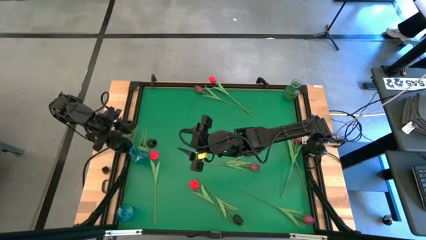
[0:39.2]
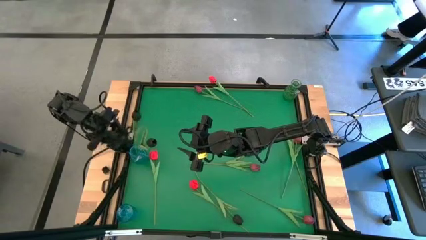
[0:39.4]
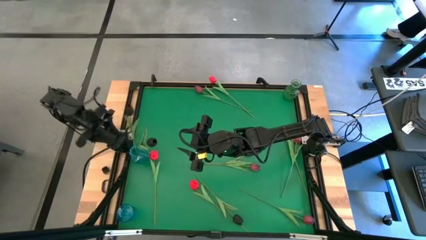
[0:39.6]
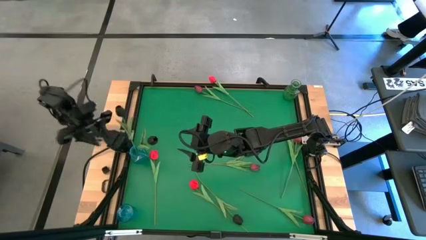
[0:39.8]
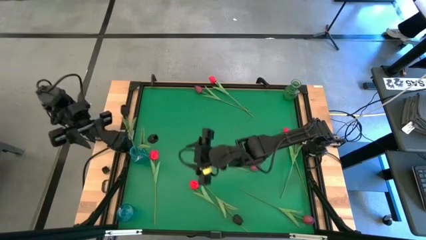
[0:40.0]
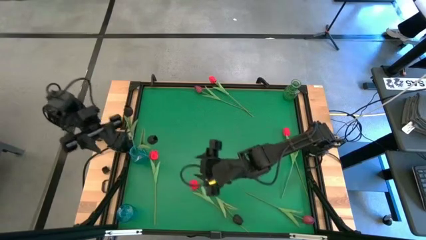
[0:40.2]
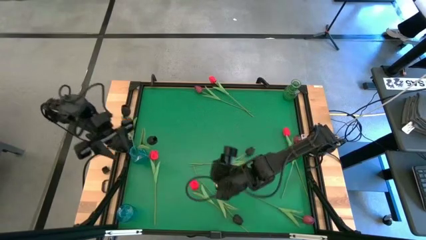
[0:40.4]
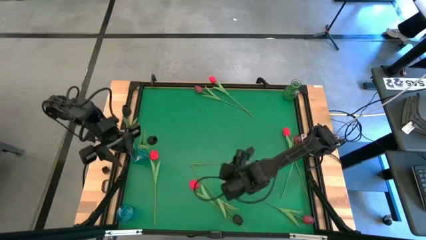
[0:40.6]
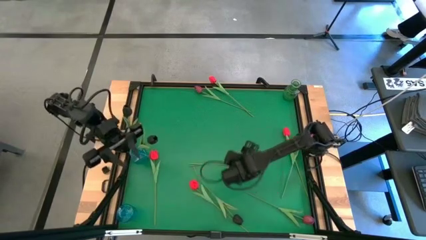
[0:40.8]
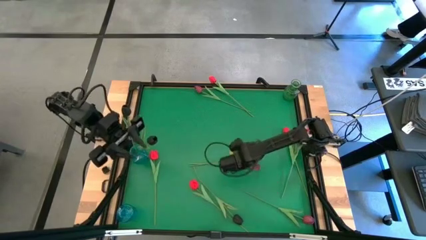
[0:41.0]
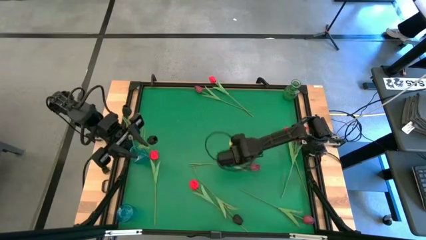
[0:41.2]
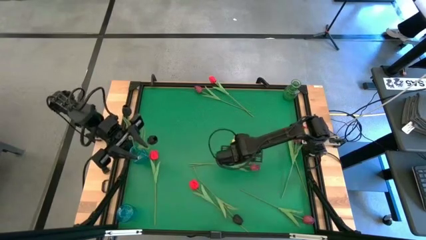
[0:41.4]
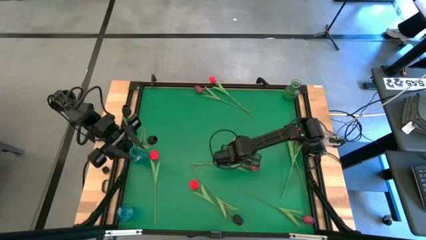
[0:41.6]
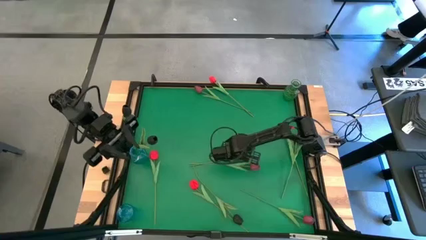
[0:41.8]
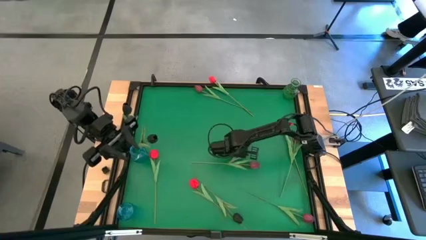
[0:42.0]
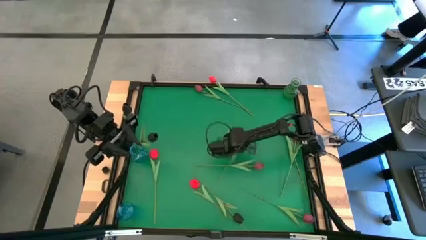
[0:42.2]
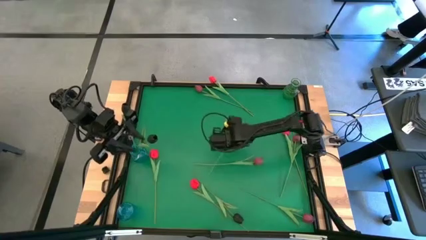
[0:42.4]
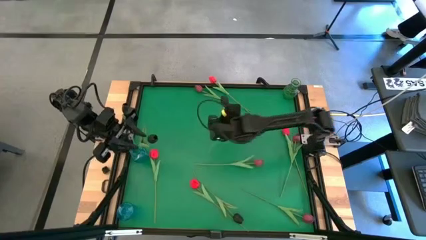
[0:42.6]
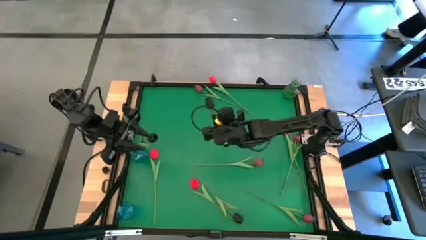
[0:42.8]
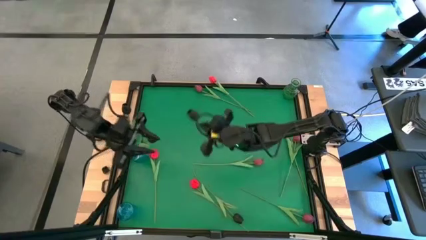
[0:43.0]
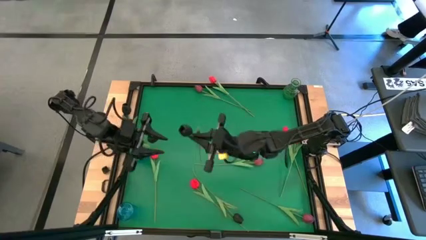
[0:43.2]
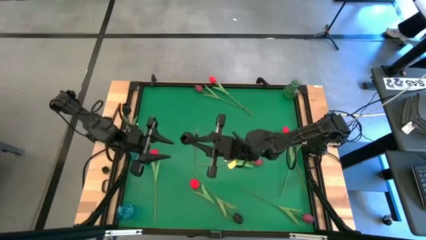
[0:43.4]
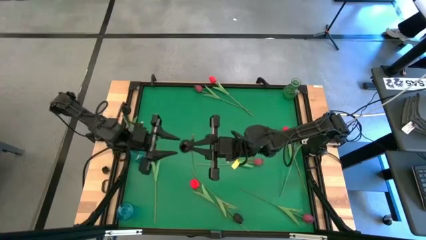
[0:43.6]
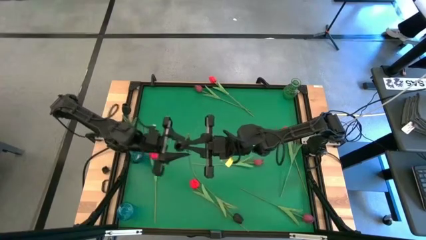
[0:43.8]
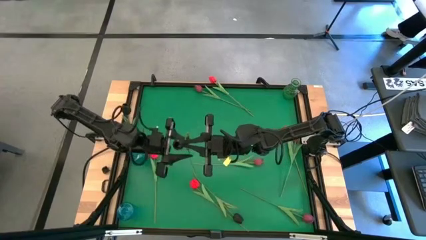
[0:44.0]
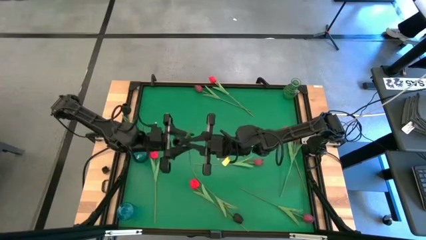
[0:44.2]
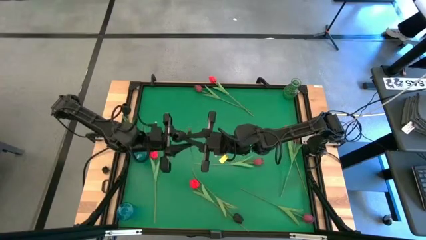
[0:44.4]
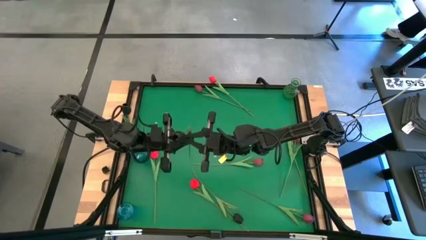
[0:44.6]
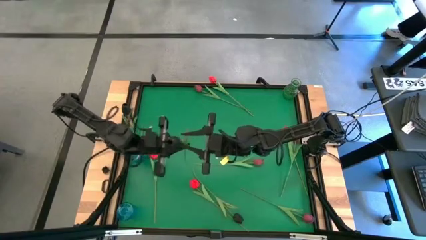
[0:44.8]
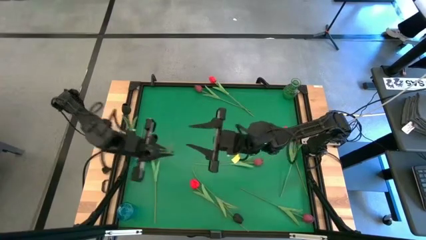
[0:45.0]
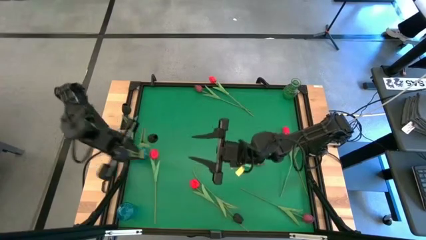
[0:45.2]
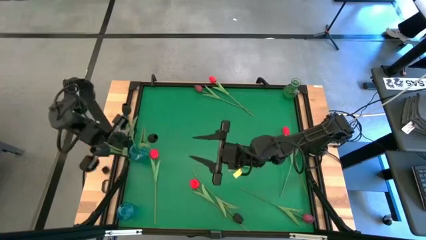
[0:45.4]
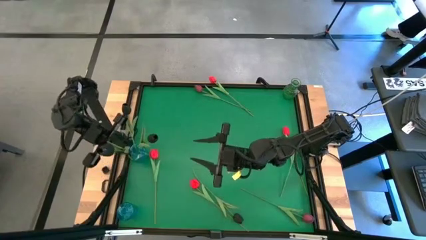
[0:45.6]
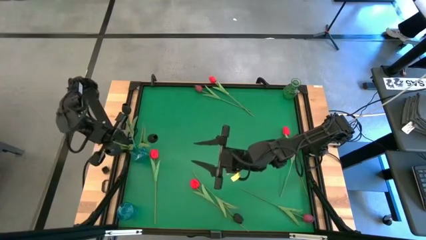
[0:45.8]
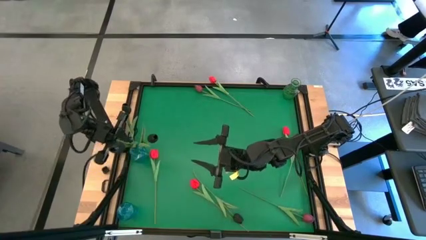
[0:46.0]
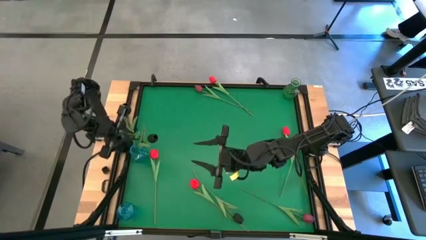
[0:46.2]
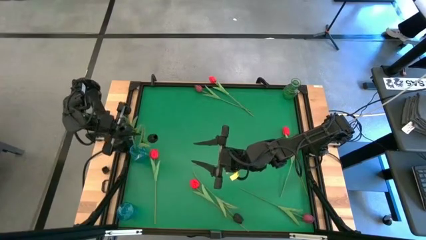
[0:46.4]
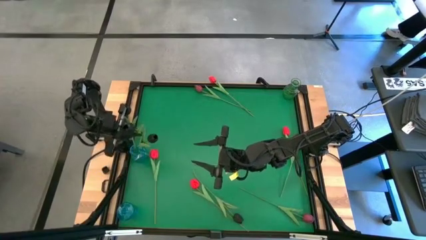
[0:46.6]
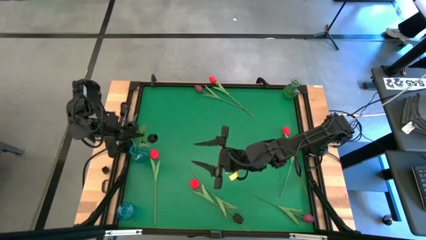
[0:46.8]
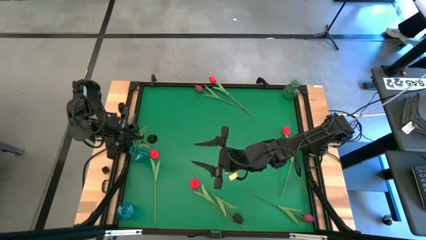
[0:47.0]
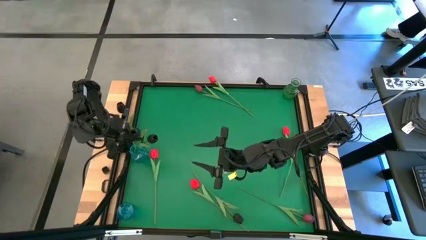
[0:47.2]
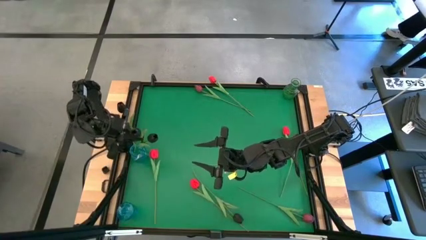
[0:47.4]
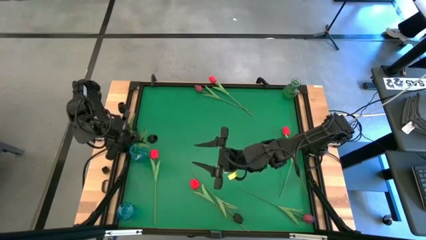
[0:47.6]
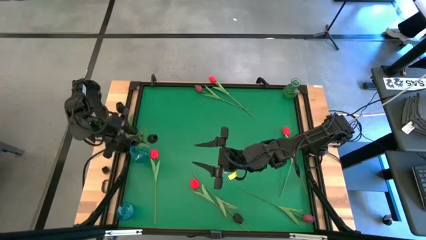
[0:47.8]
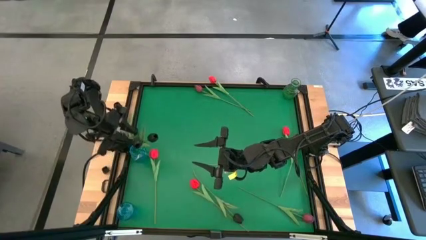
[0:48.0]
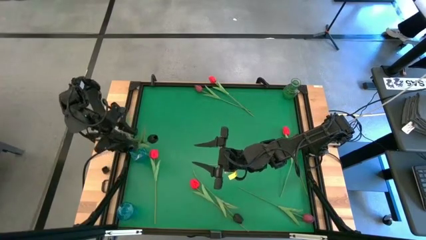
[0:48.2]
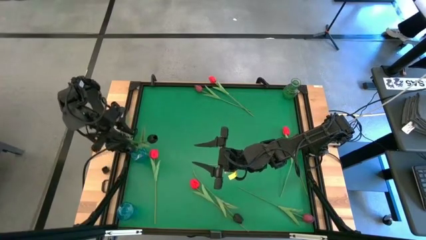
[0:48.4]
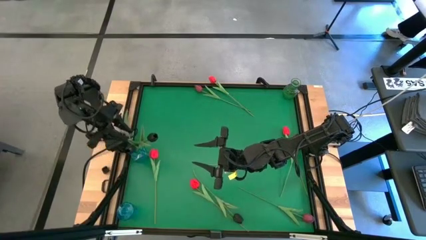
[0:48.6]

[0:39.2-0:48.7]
Task: Sort flowers into vase by color
Put the black tulip into the the top blue vase

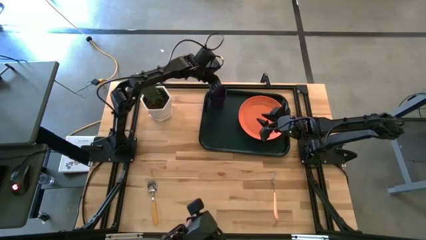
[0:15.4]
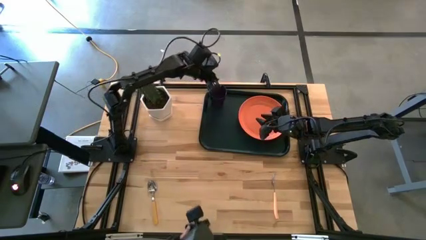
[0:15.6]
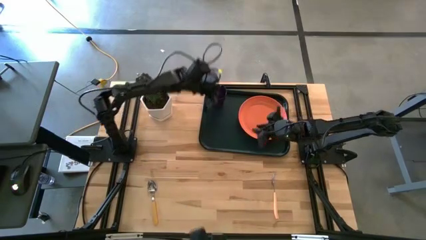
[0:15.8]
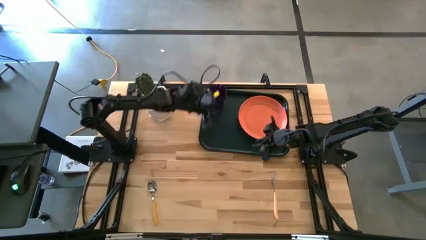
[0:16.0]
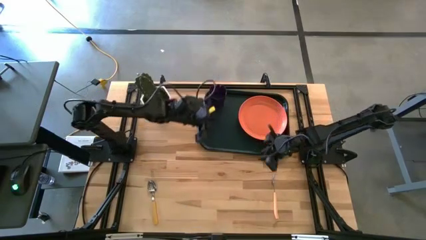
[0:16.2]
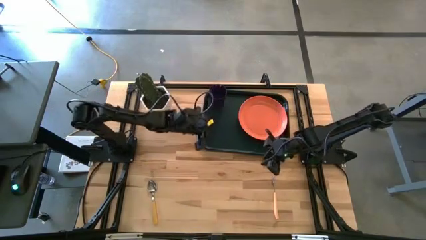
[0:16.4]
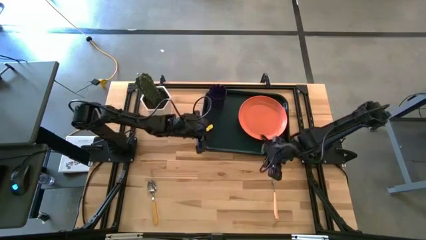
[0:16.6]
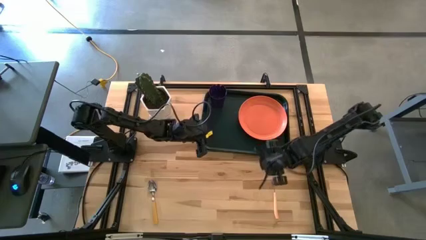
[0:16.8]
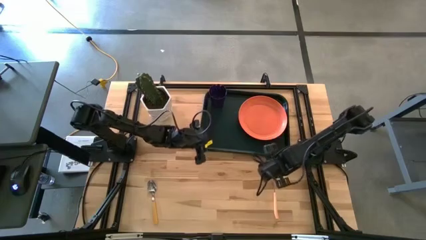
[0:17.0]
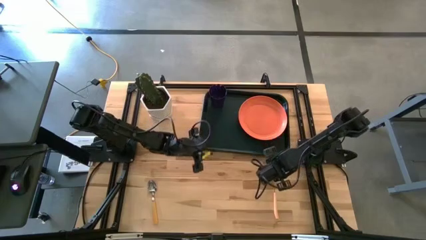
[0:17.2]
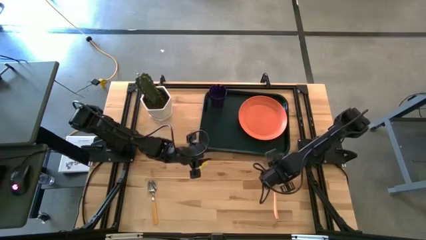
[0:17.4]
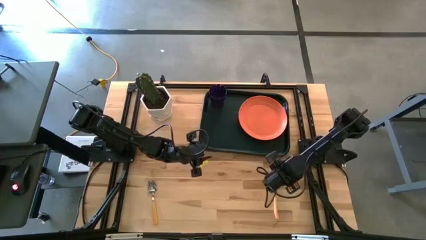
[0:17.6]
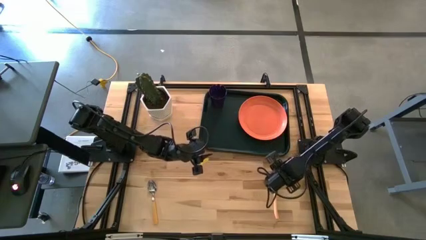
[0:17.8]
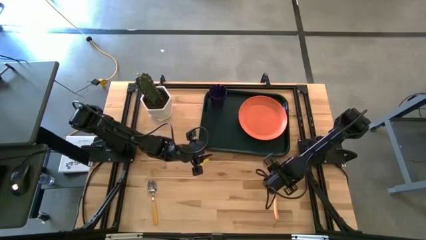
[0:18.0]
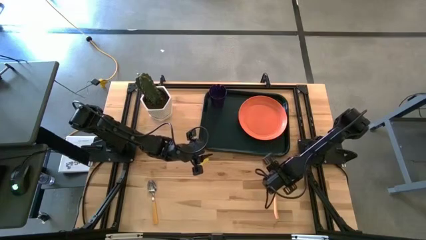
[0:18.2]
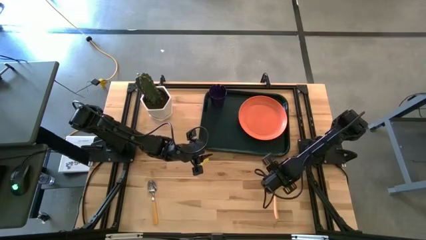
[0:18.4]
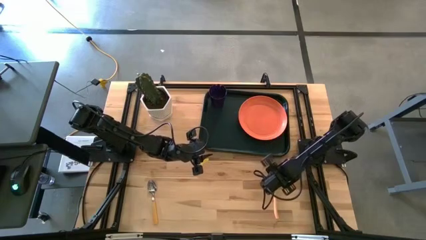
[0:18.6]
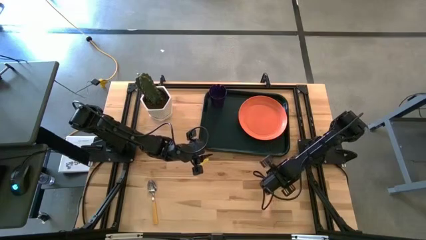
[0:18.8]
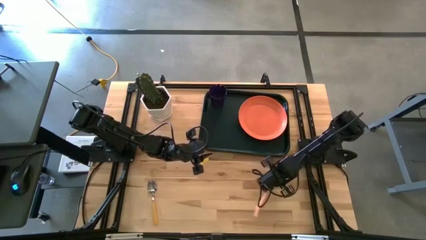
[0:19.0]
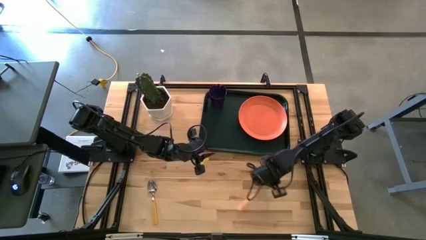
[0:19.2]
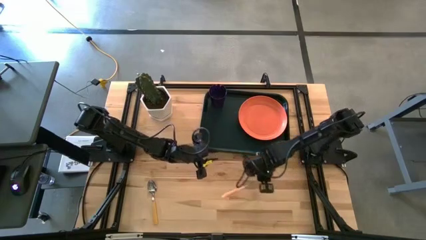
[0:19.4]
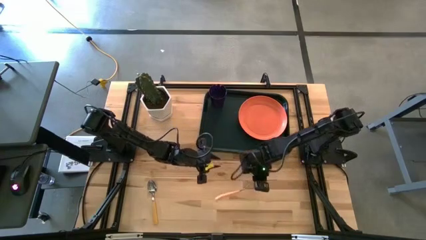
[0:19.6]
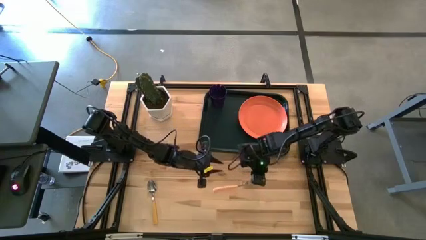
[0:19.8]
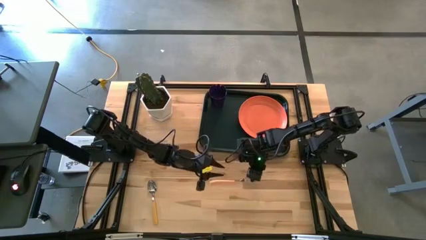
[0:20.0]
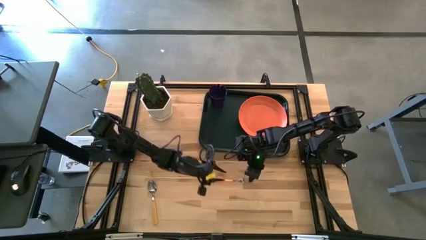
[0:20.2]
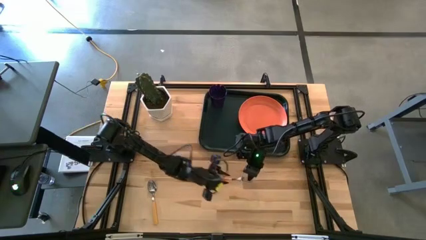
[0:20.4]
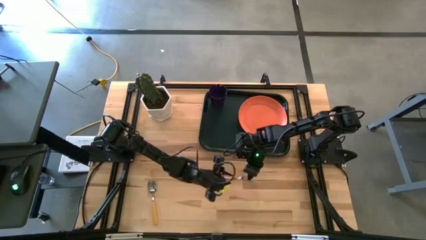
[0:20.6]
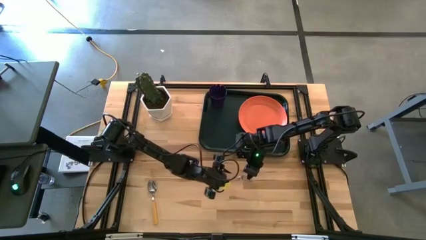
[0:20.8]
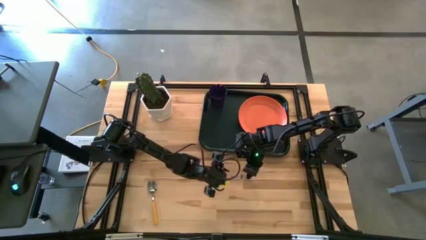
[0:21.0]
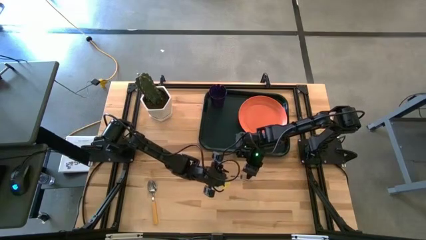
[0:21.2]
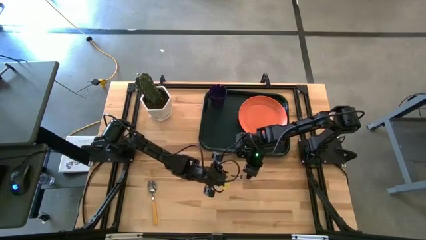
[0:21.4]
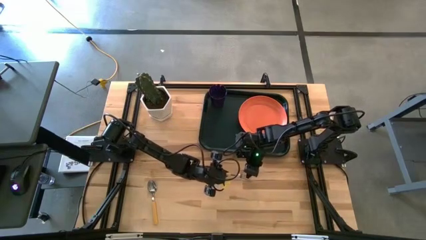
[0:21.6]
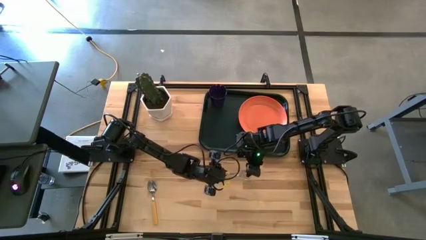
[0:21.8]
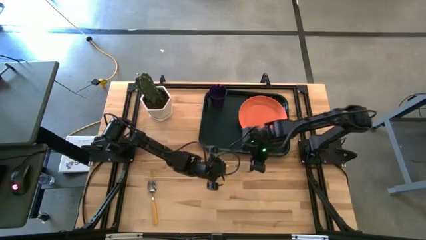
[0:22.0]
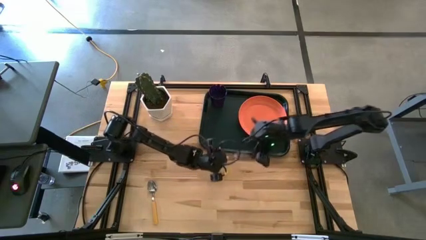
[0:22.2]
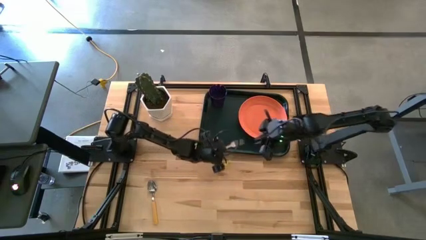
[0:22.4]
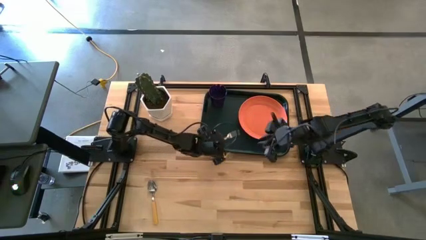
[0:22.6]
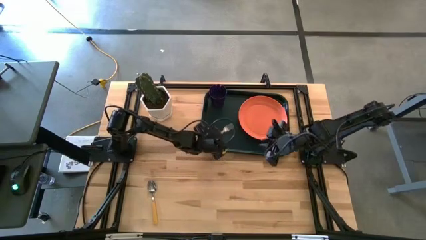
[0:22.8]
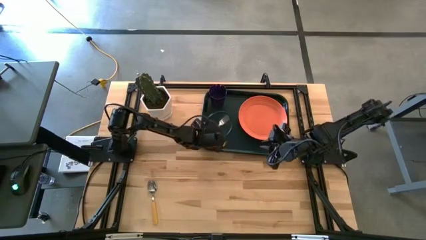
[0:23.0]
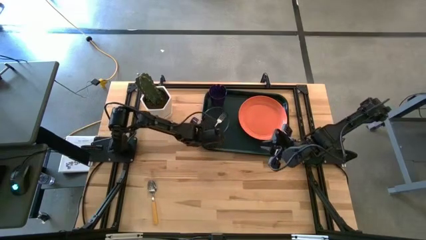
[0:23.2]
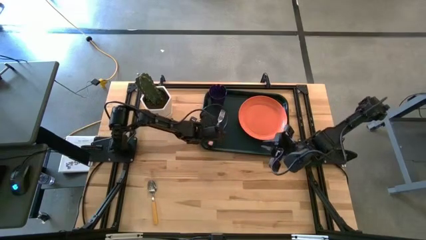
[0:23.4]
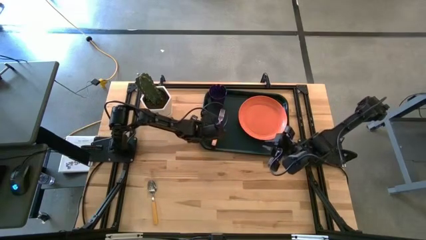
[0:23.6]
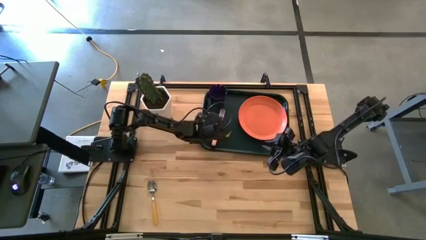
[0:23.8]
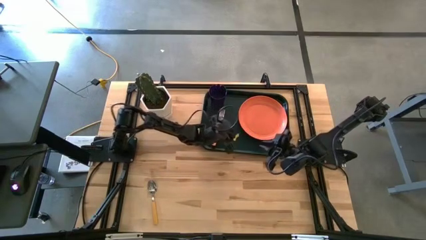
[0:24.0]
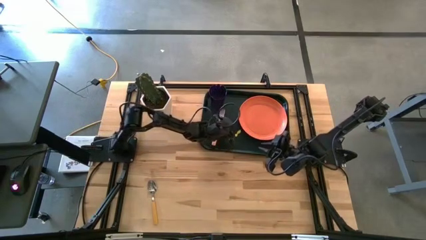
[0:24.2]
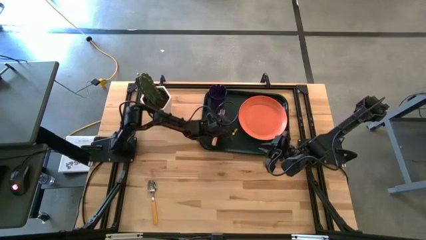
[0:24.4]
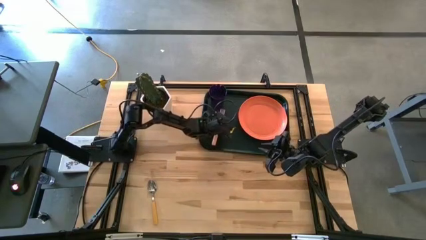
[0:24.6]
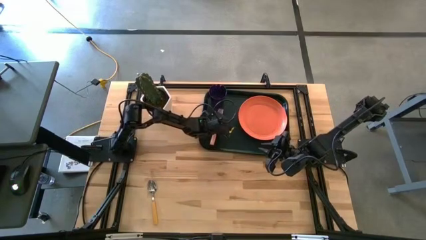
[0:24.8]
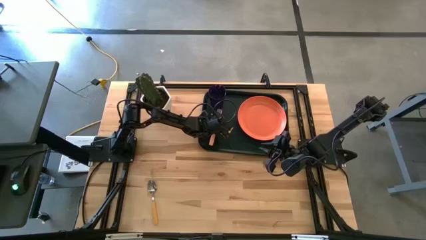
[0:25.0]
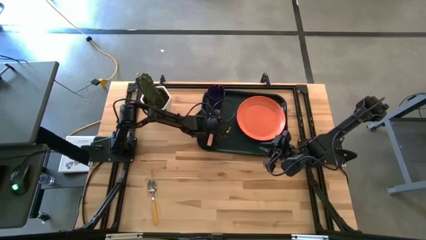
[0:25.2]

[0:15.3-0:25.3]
Task: Pick and place plate/cup/fork/spoon on tray
Put the fork on the black tray to the bottom of the purple cup
